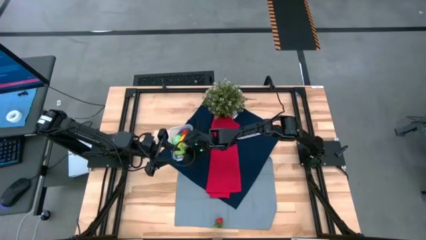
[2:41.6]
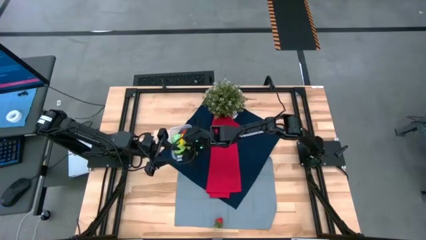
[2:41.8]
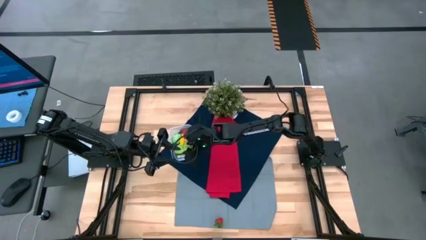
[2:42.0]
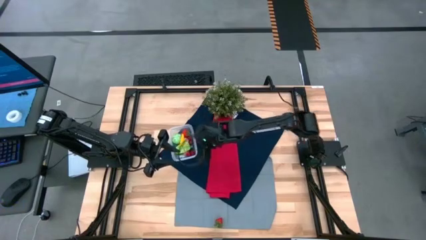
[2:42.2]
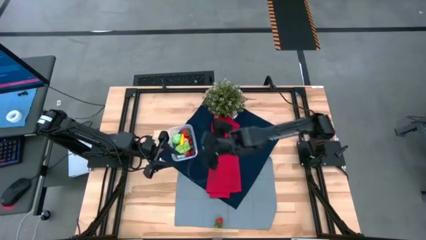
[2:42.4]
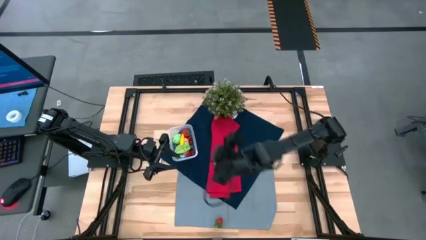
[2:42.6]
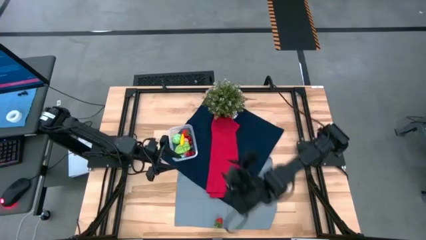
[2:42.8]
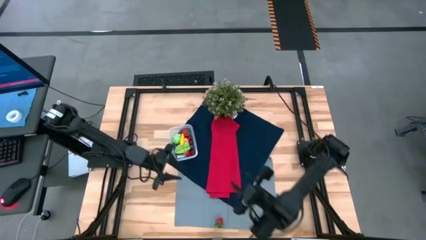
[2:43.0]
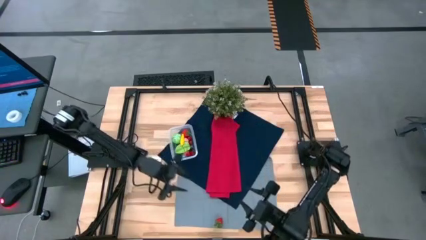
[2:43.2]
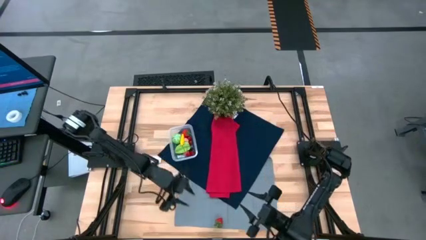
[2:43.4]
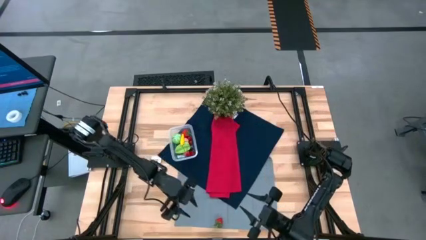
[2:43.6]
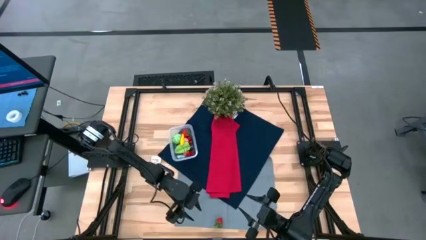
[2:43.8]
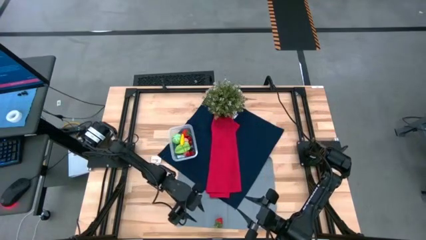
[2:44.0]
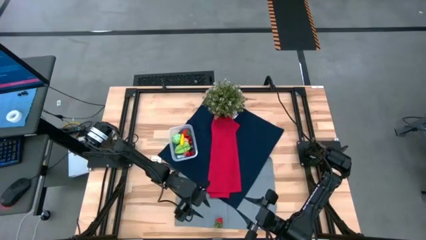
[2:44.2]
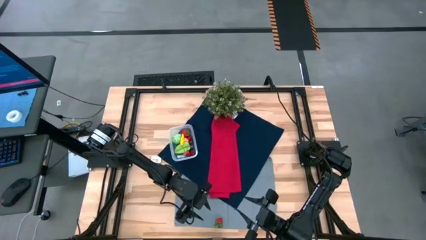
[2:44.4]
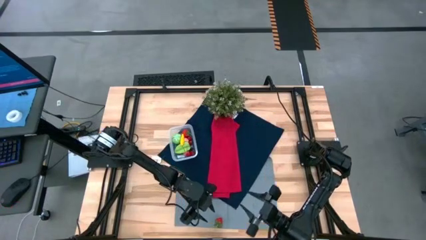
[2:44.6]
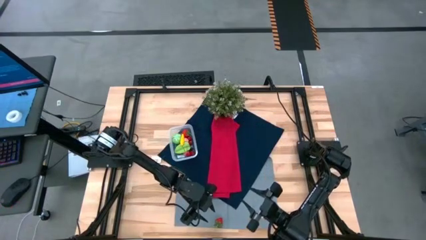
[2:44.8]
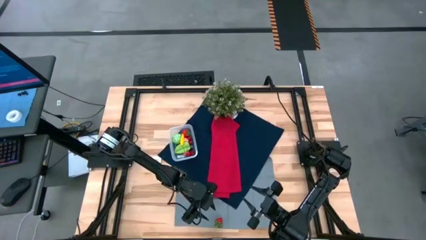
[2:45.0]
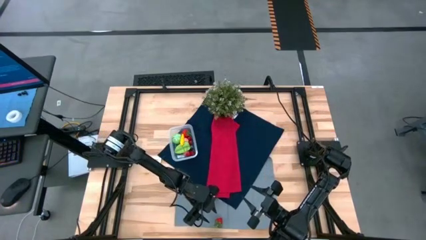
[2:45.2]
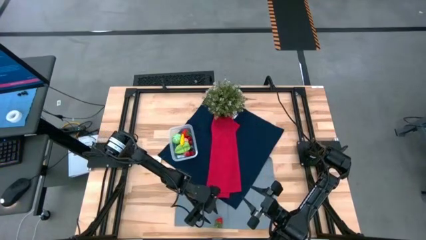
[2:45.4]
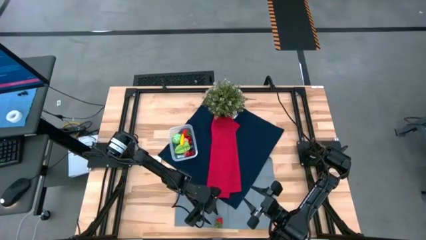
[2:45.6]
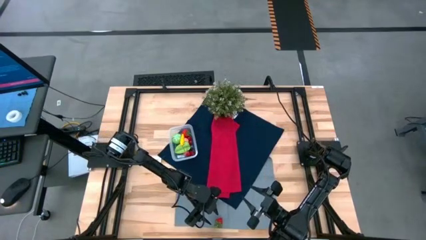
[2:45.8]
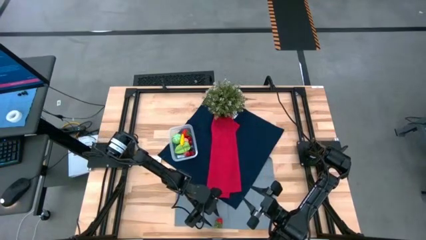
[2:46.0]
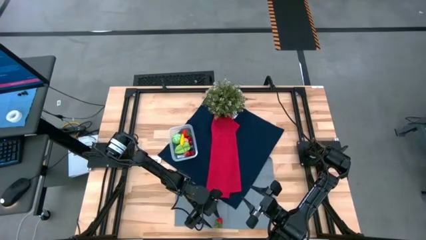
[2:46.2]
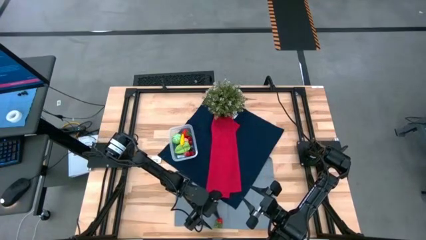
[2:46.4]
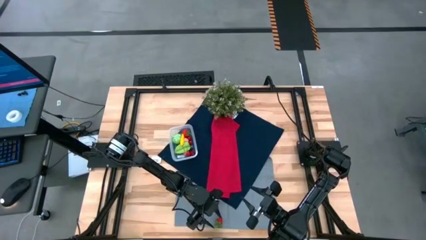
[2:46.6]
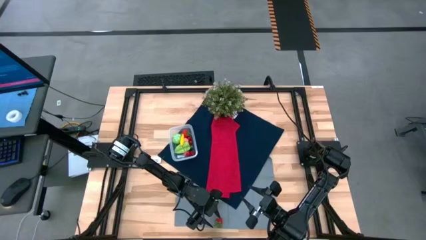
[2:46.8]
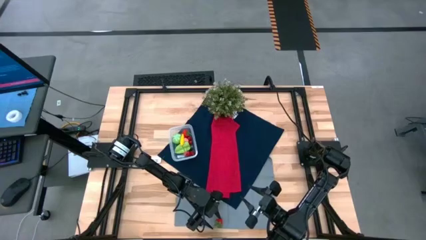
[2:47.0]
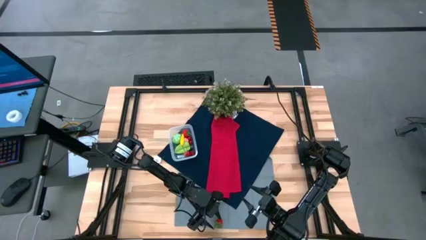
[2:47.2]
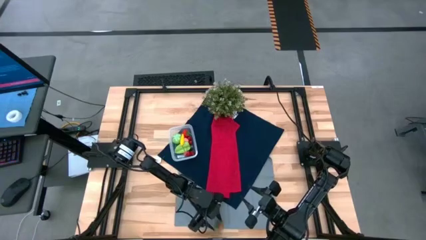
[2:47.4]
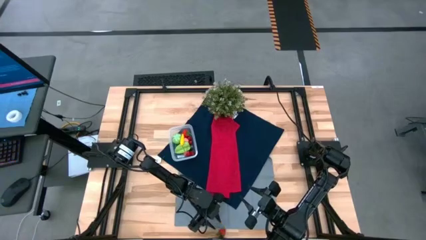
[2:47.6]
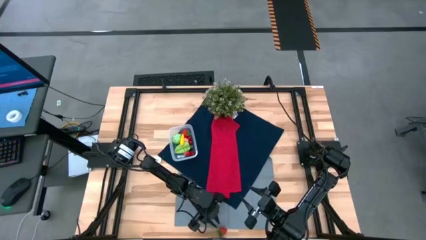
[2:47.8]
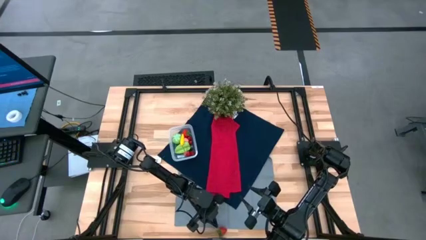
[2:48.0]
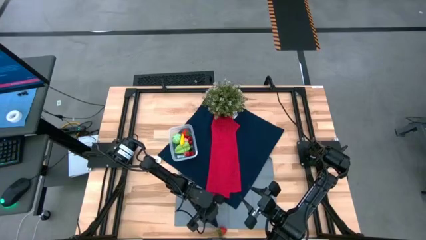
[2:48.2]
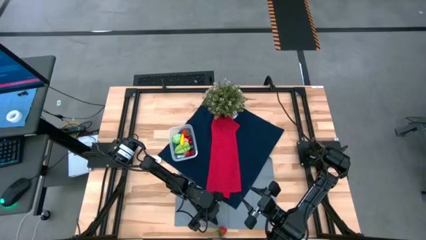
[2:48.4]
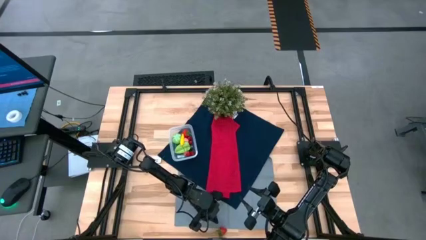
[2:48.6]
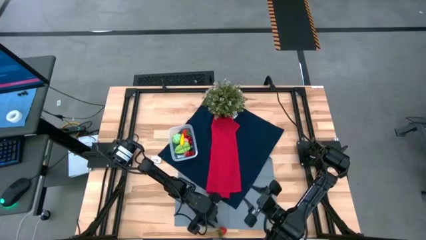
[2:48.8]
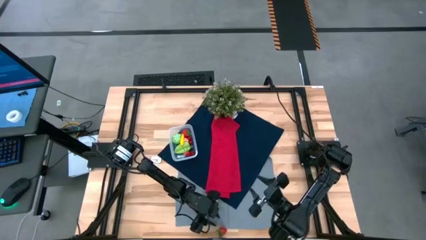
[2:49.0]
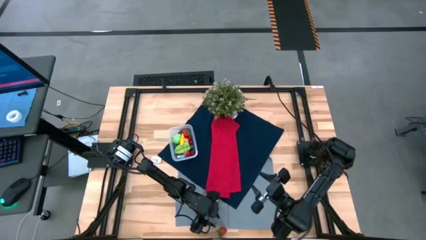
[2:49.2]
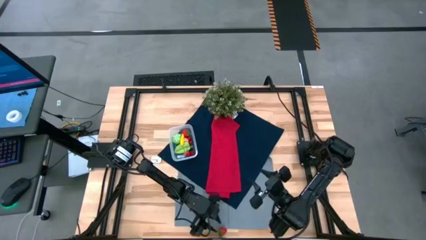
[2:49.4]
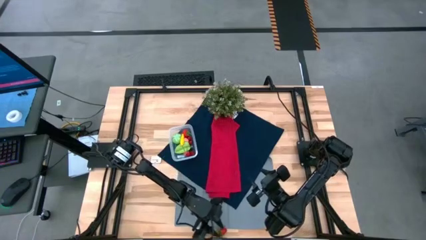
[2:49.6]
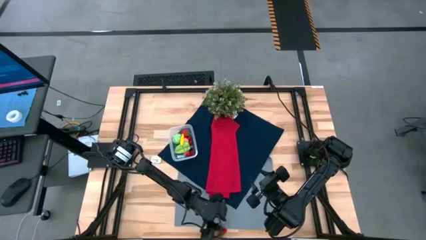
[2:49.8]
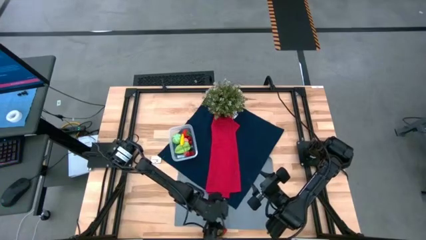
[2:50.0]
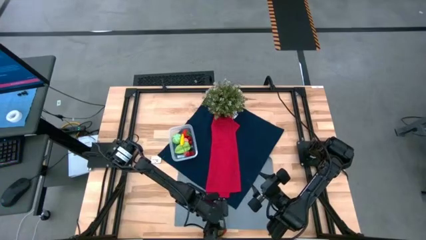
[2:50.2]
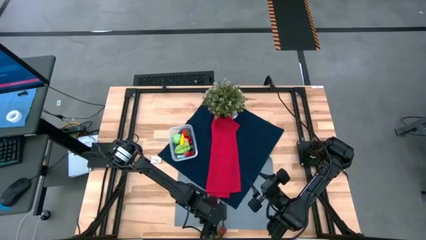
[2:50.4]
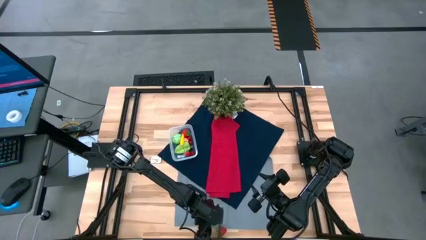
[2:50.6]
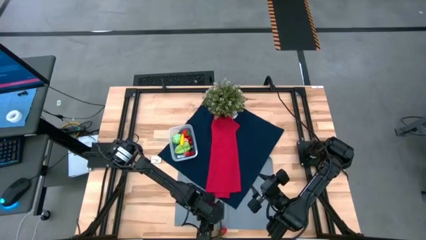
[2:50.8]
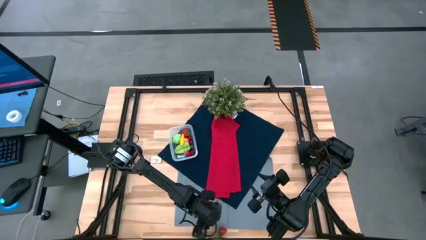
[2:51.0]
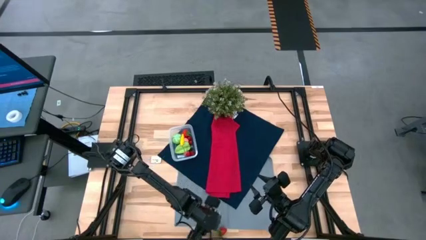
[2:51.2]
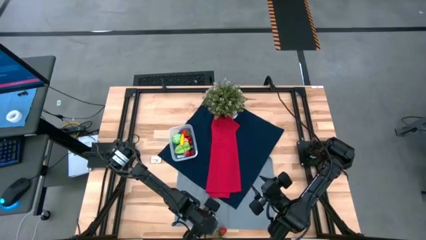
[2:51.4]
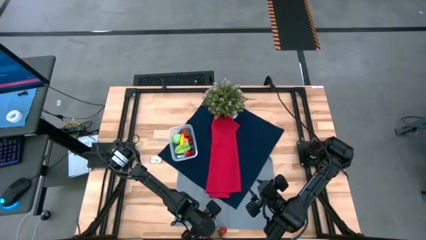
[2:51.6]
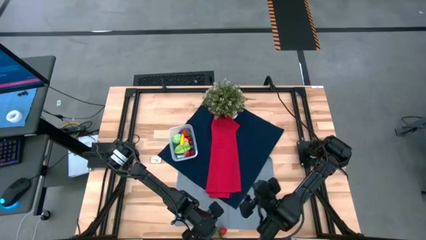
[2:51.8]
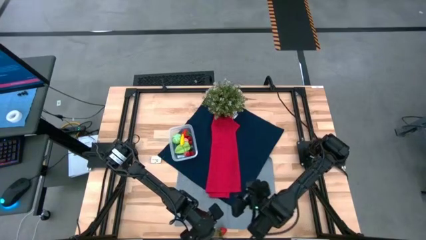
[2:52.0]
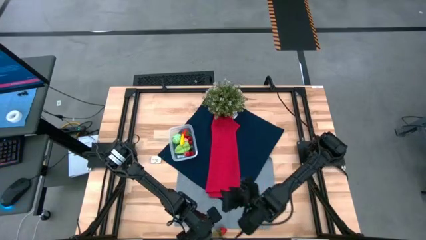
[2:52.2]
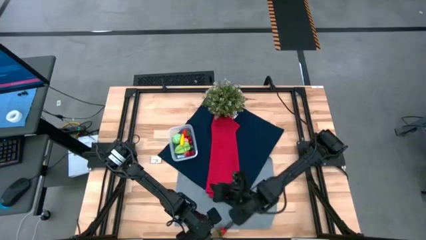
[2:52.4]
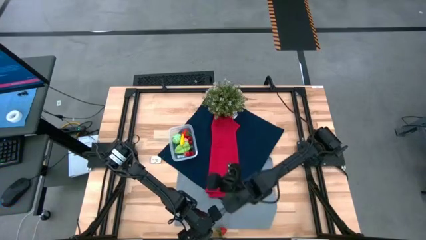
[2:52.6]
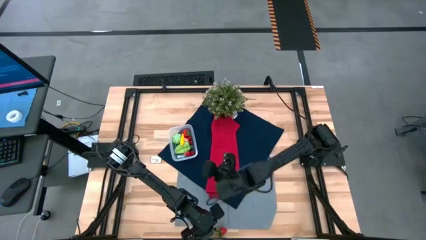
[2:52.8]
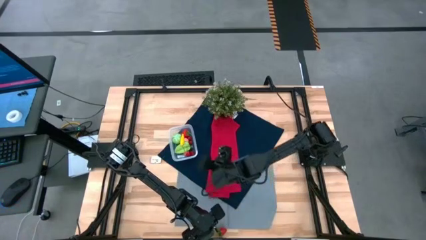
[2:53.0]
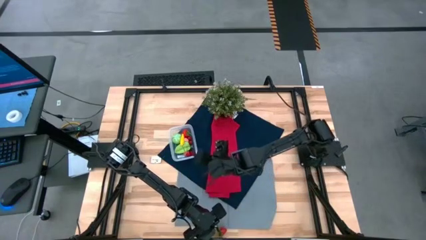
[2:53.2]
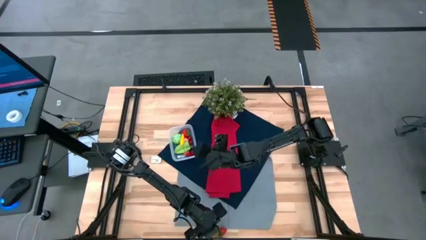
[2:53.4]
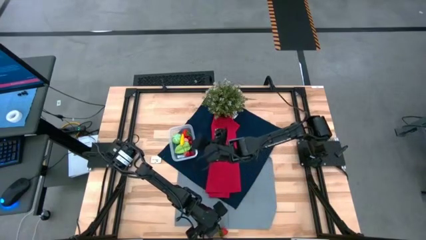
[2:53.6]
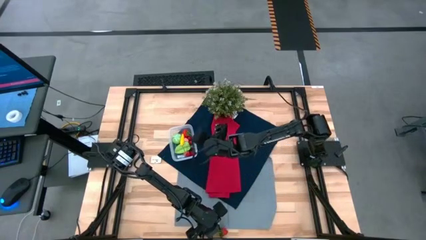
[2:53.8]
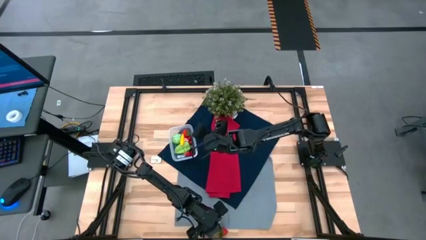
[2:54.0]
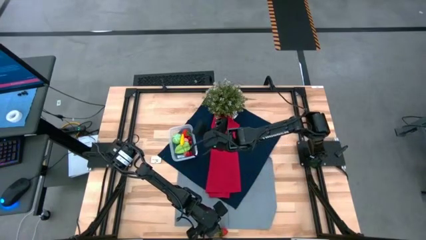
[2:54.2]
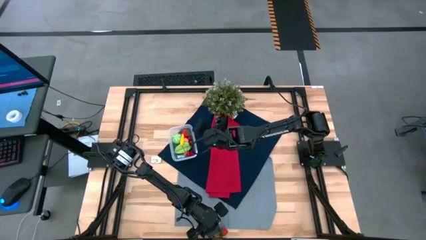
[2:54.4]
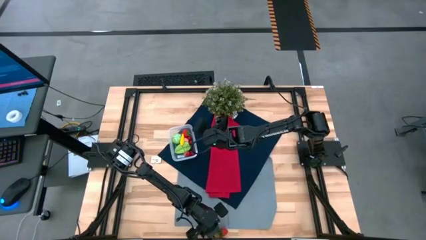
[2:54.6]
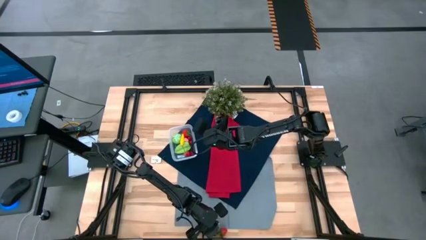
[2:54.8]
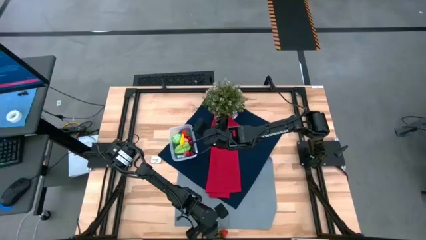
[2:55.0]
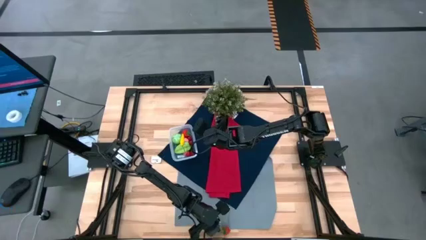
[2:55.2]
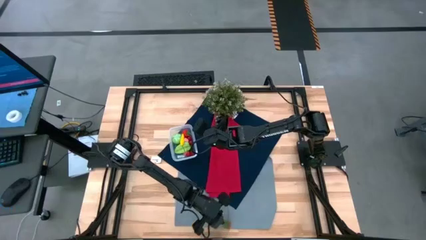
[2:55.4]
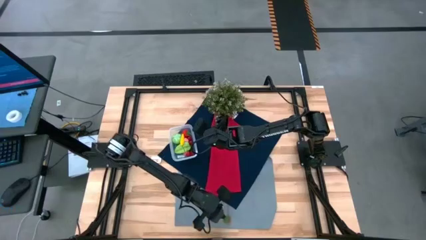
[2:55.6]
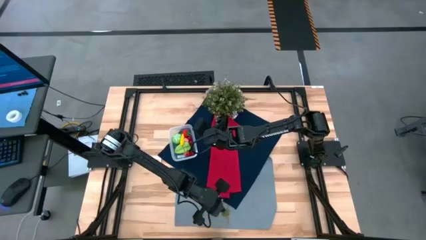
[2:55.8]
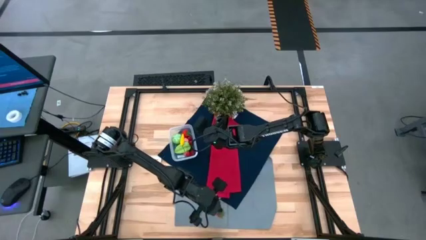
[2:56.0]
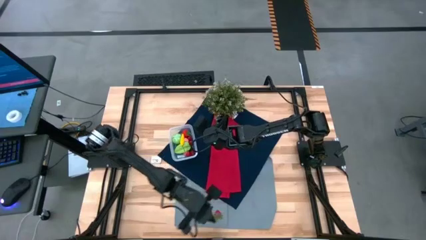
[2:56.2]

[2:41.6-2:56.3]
Task: Pick and placing Produce into tupperware
Put the red strawberry into the transparent bin
